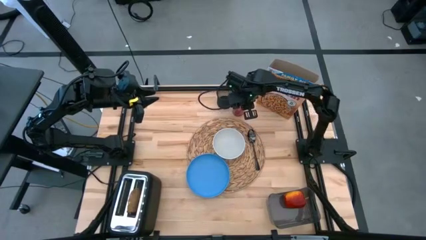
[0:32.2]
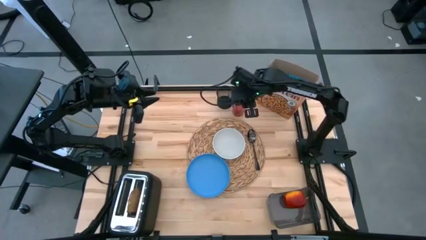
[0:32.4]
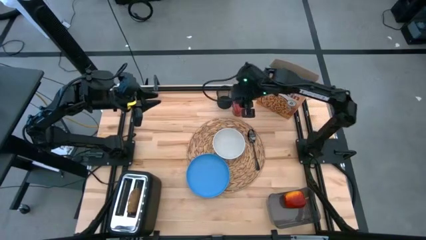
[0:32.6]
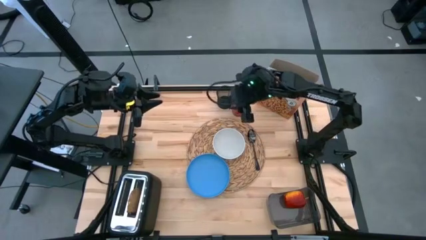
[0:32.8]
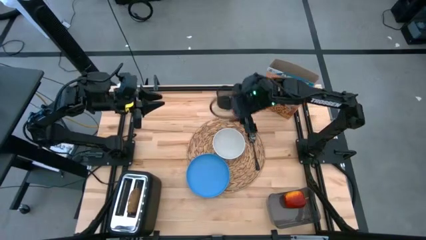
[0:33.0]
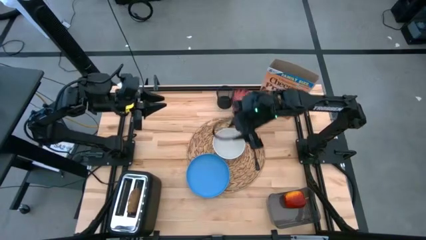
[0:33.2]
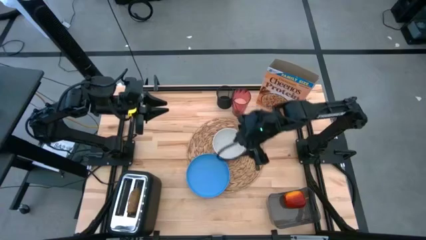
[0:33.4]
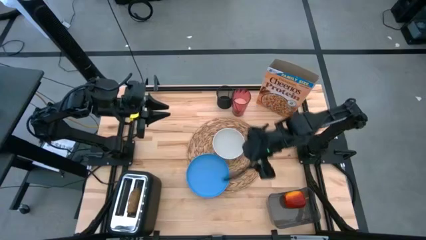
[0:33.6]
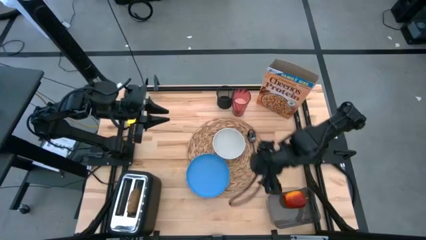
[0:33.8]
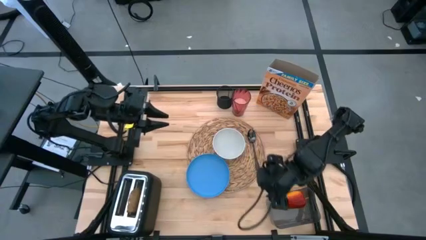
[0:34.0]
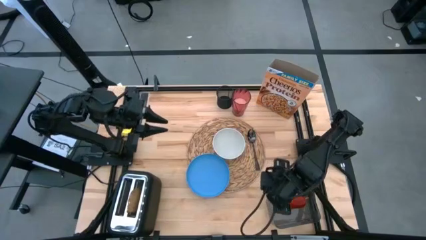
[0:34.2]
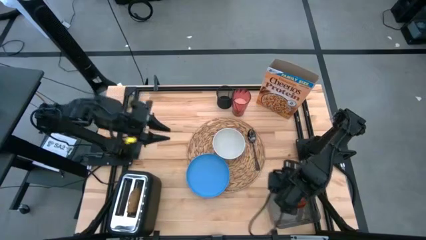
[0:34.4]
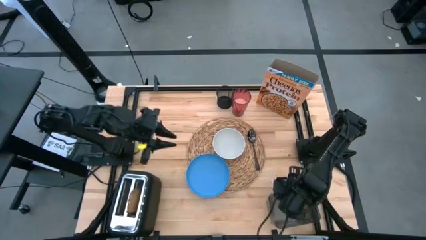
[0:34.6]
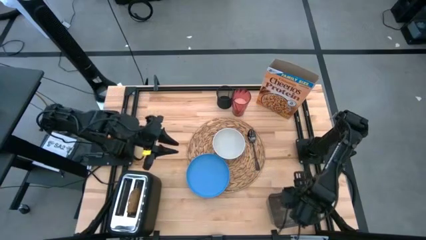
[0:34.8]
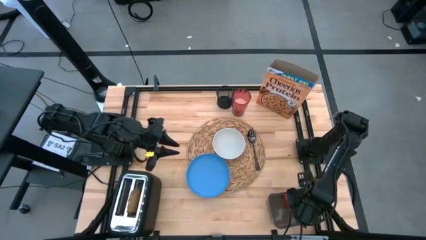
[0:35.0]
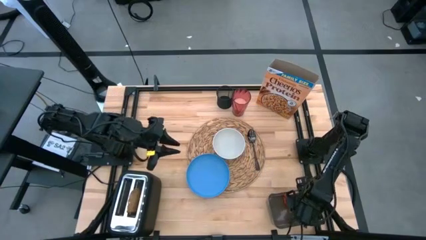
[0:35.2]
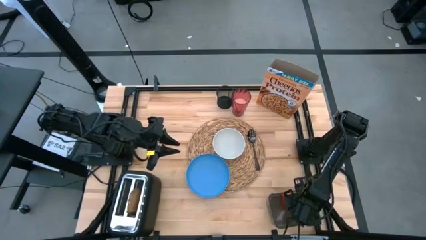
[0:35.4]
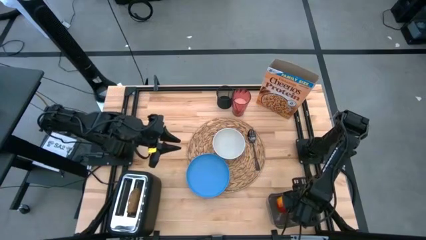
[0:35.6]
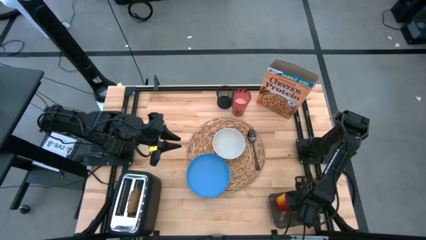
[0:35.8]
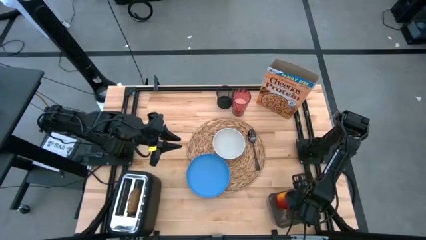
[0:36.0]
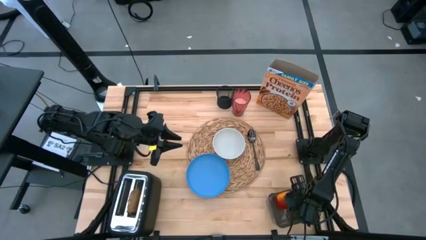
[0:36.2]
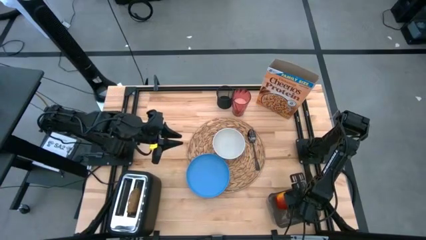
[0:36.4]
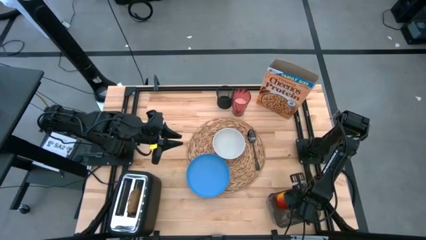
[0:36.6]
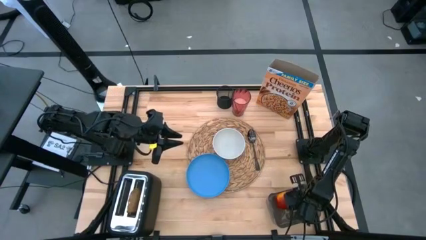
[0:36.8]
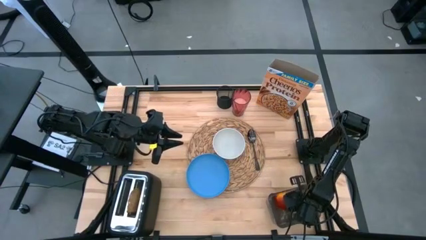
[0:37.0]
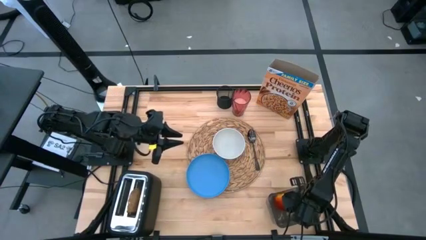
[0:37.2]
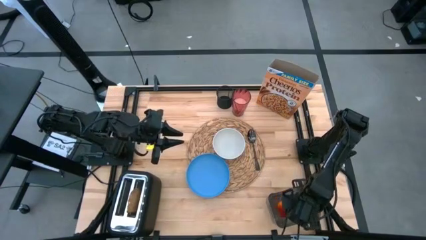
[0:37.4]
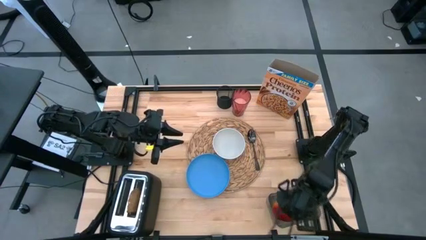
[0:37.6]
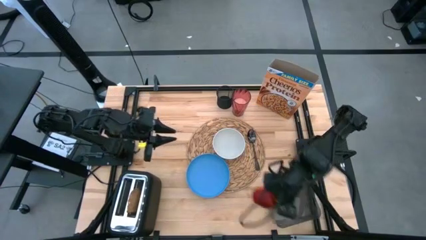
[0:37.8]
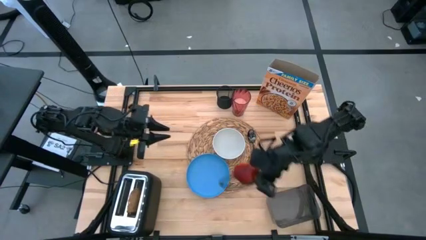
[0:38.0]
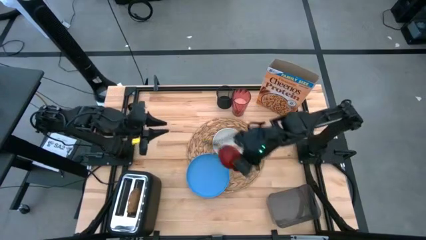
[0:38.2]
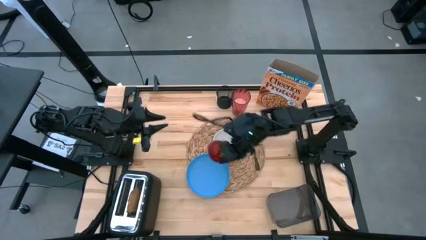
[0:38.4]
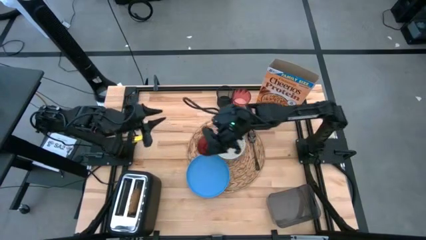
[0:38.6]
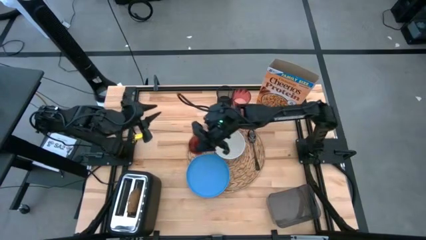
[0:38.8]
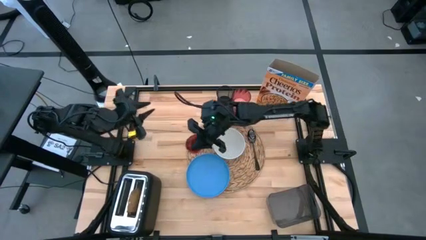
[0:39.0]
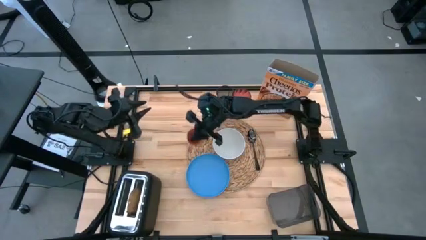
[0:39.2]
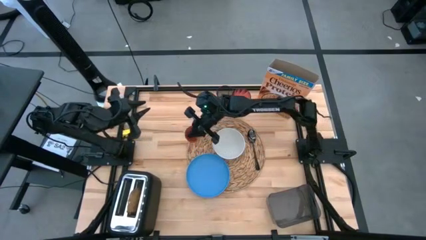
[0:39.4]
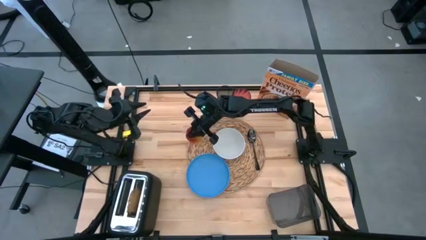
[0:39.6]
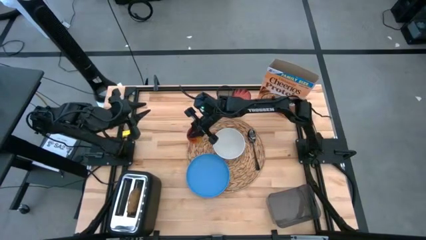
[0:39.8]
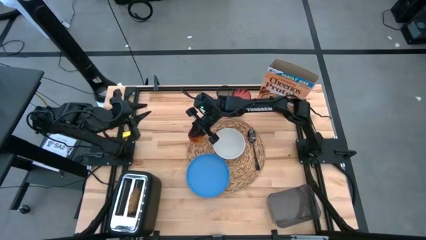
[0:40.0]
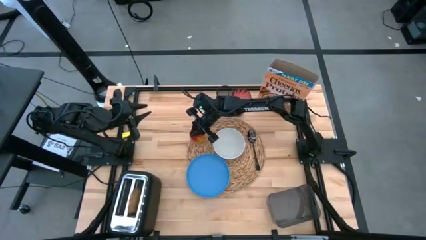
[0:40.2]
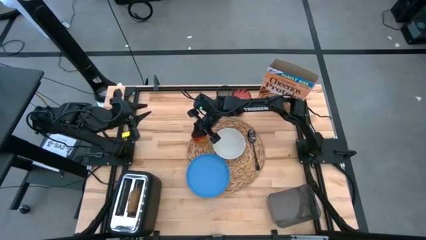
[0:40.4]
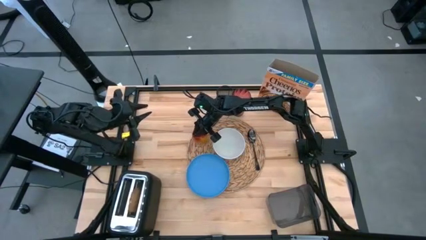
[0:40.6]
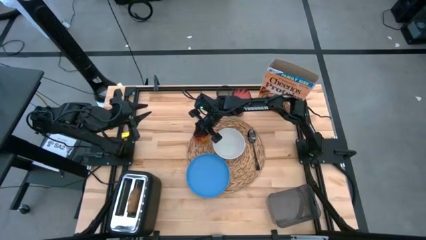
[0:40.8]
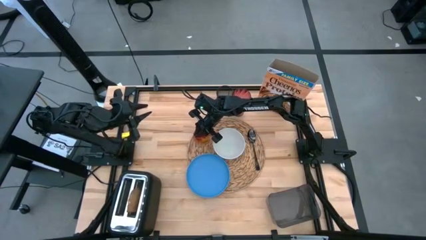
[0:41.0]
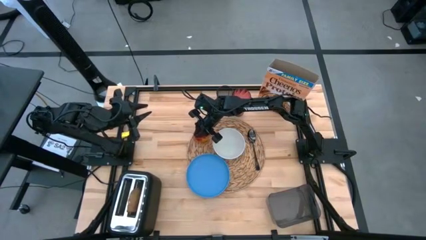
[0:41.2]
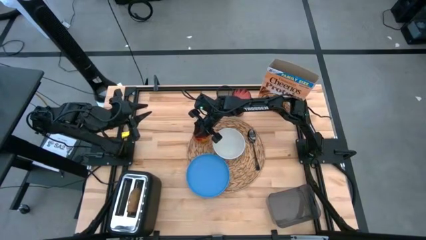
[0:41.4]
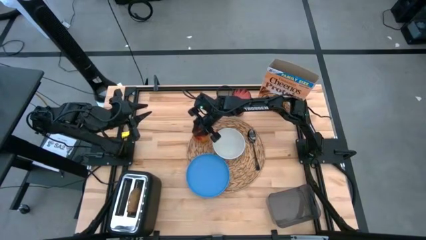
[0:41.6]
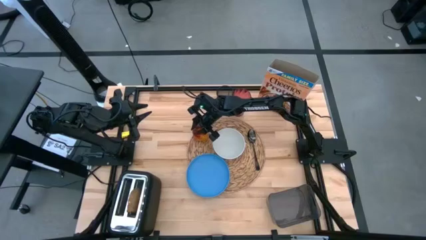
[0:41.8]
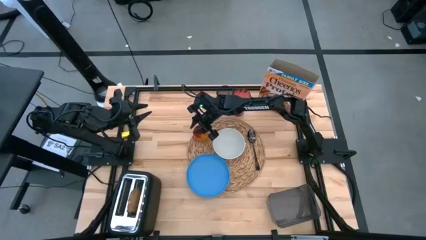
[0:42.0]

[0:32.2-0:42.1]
Task: Arrange a breakfast setting
Put the red apple on the brown placemat to the left of the white bowl

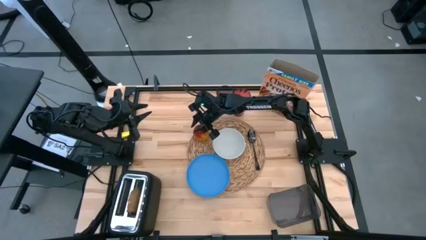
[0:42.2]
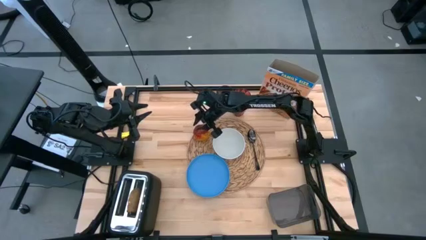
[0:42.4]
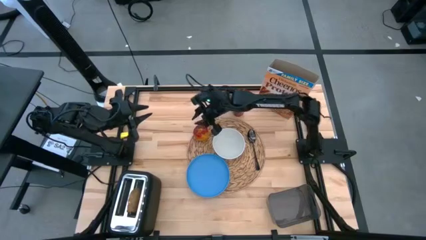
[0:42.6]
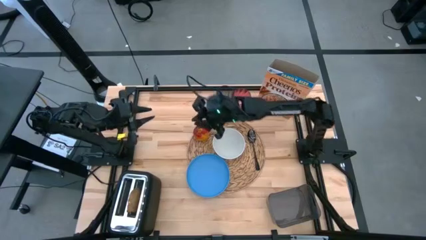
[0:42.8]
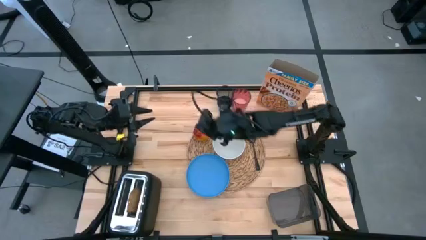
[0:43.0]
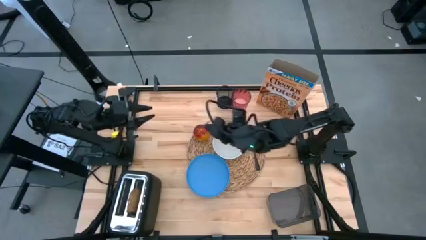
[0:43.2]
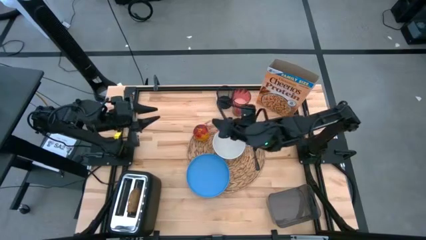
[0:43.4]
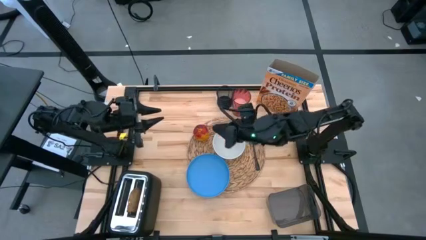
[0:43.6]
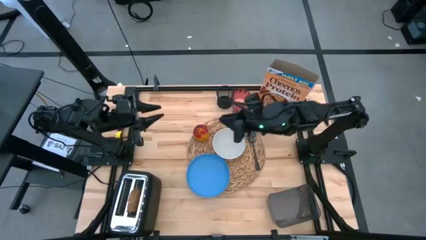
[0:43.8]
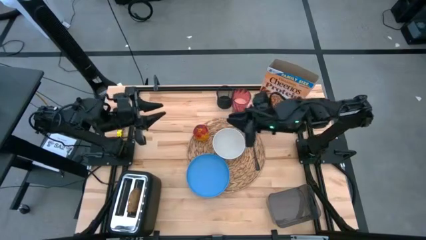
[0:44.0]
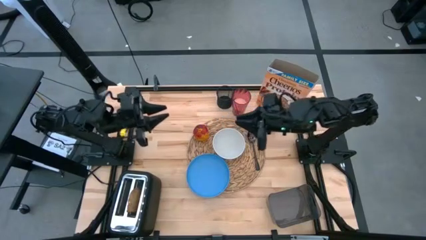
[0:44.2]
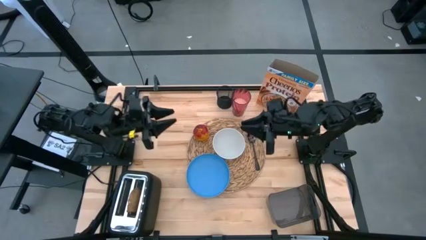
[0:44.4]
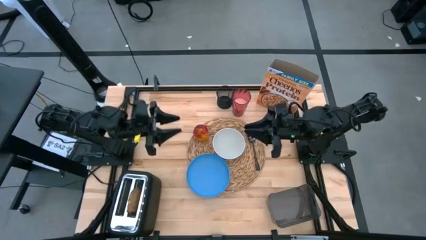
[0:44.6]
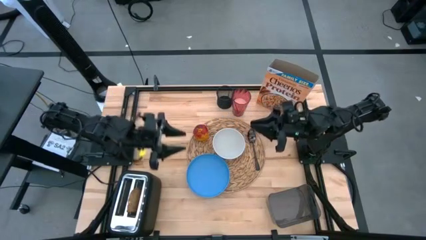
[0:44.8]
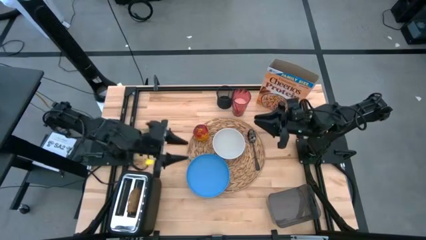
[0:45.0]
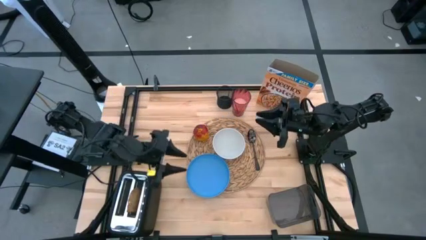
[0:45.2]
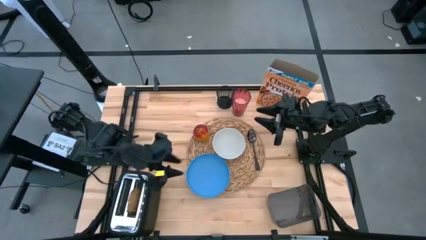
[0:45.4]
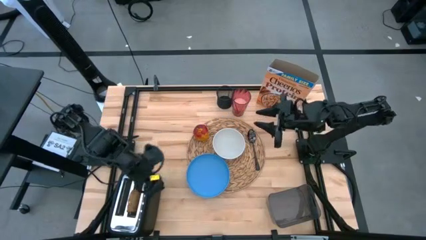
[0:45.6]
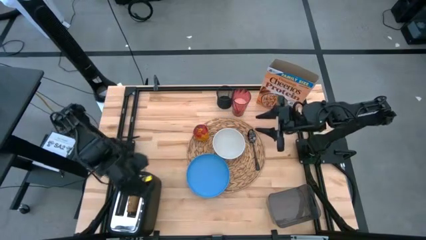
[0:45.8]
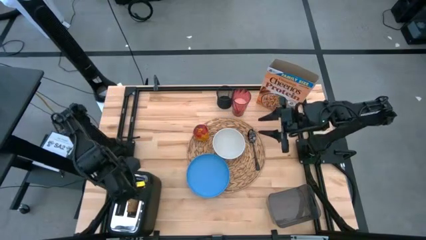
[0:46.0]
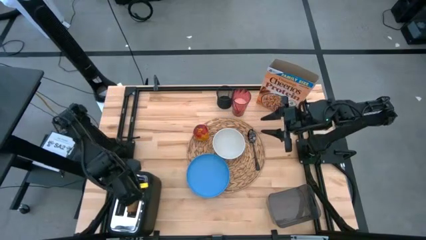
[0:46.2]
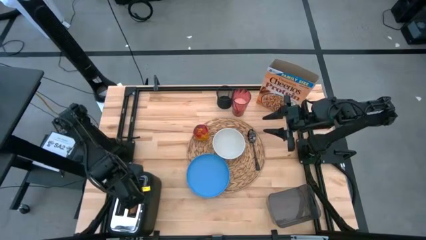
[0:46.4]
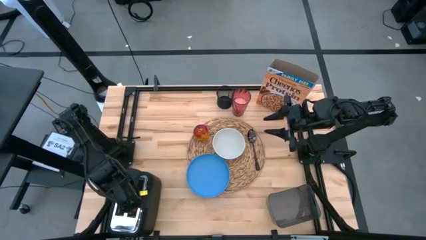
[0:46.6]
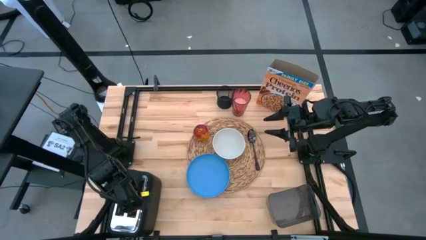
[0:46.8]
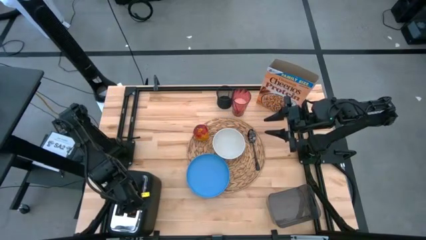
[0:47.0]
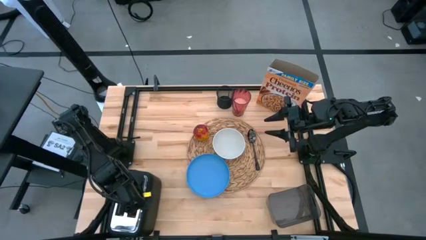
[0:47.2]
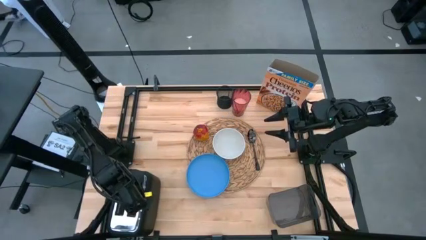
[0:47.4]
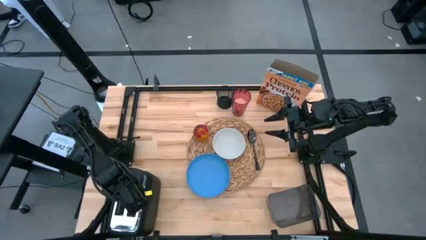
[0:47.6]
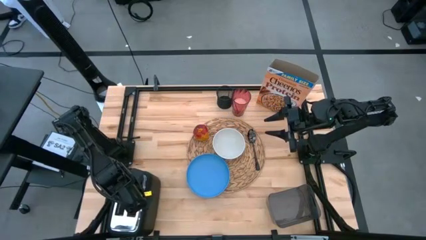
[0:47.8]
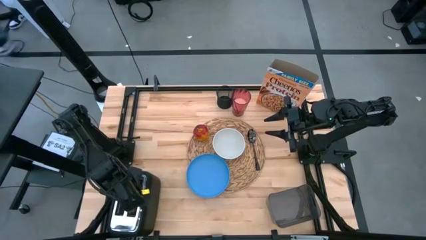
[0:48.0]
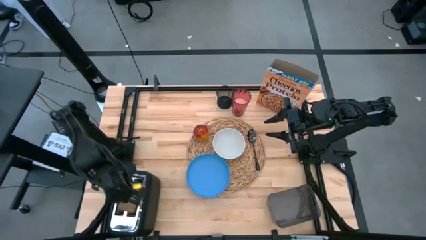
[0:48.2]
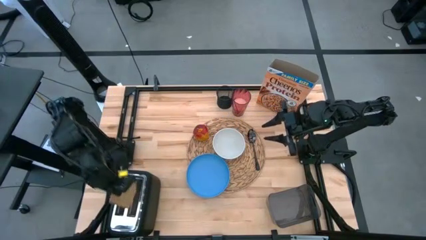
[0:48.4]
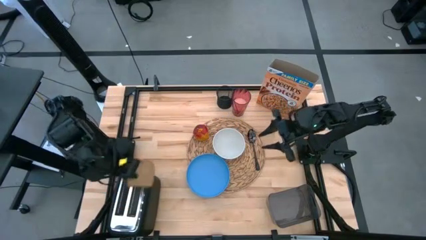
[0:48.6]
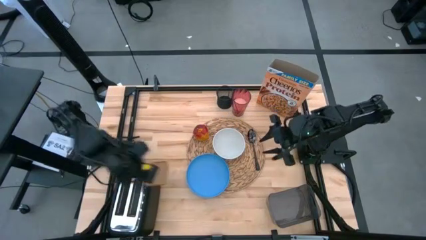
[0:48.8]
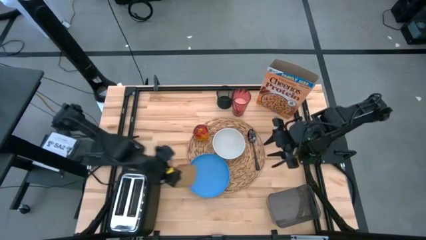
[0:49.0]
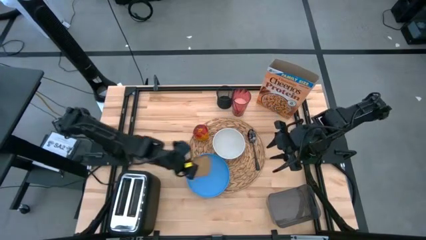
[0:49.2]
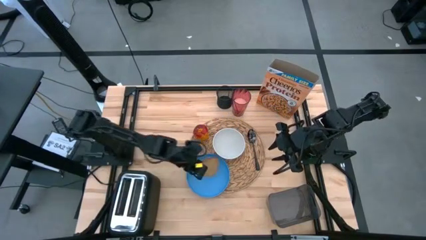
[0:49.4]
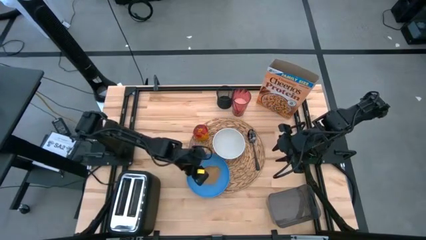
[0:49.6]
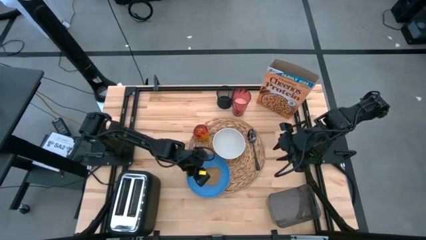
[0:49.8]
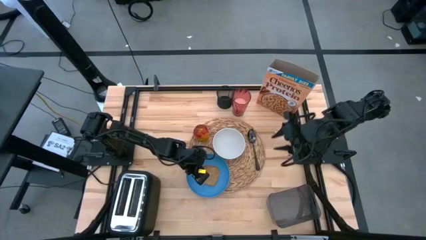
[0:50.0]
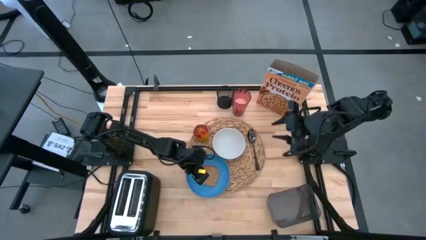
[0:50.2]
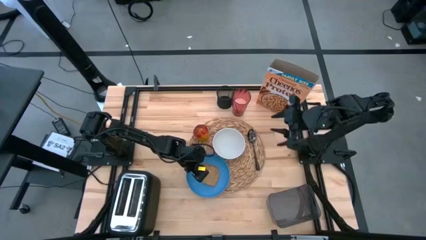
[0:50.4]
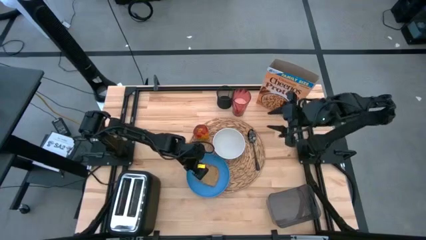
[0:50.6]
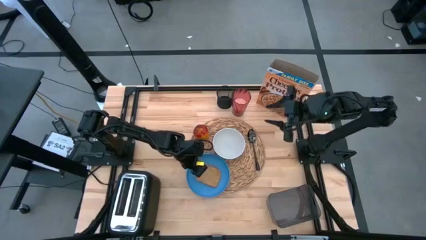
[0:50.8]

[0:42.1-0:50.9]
Put the brown bagel on the blue plate to the bottom left of the white bowl
